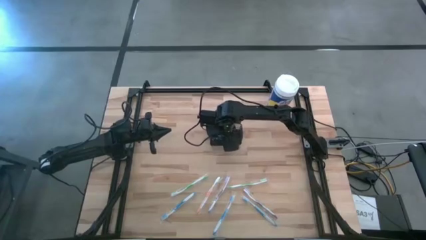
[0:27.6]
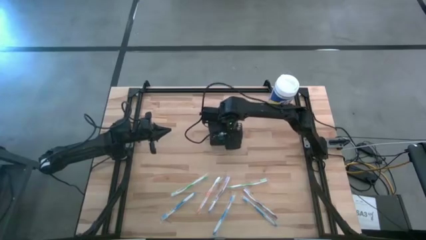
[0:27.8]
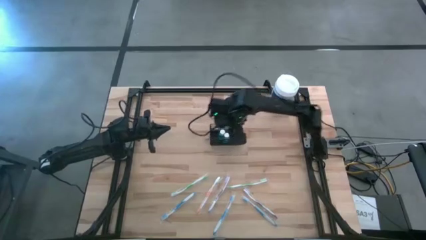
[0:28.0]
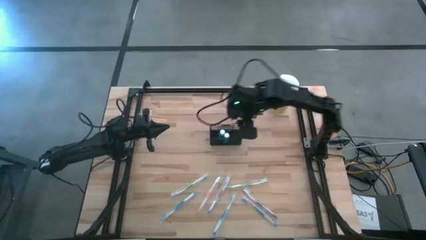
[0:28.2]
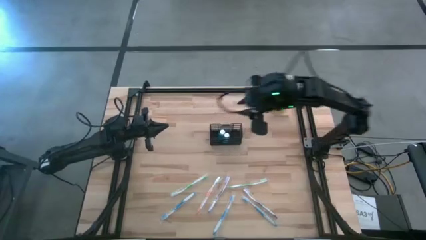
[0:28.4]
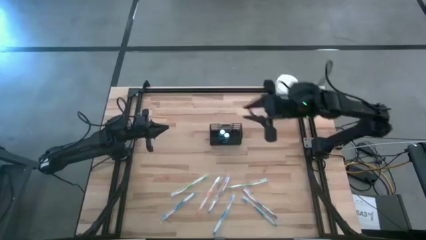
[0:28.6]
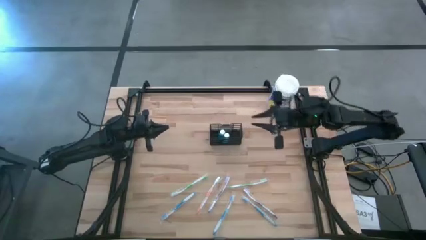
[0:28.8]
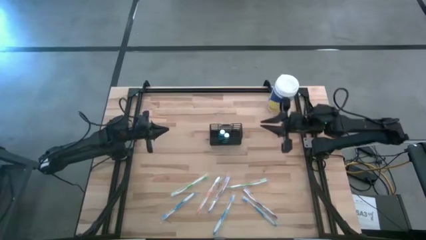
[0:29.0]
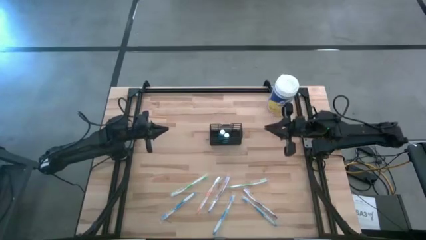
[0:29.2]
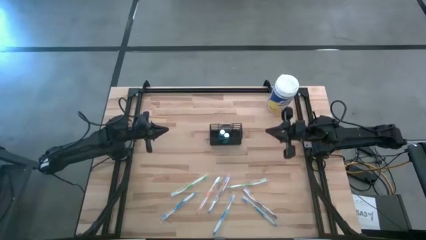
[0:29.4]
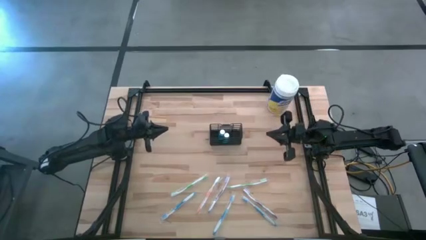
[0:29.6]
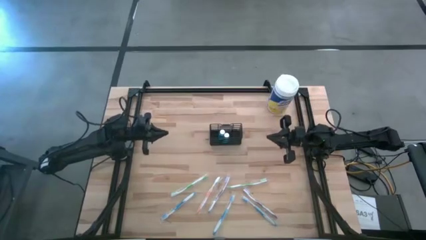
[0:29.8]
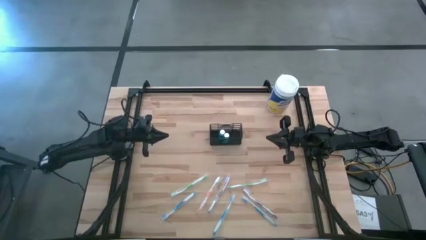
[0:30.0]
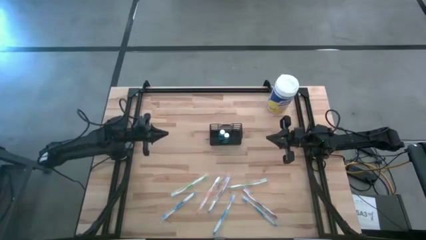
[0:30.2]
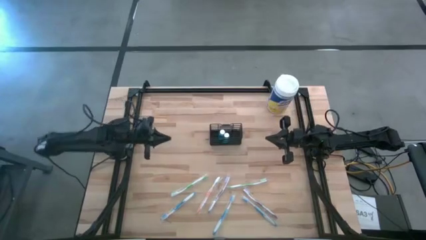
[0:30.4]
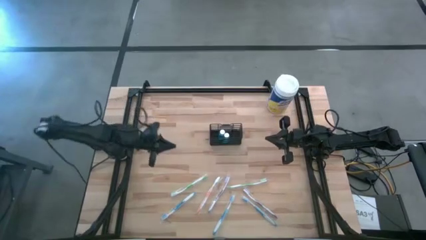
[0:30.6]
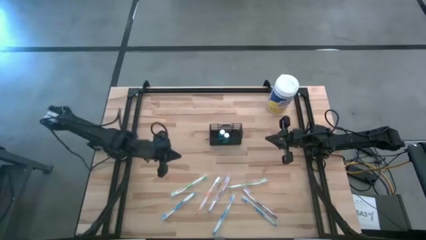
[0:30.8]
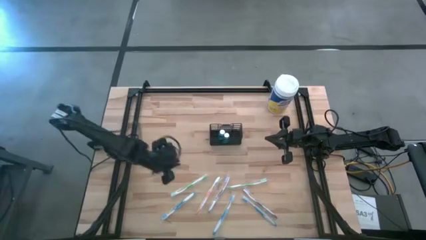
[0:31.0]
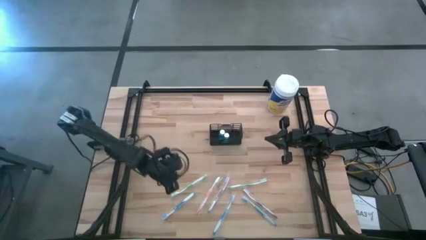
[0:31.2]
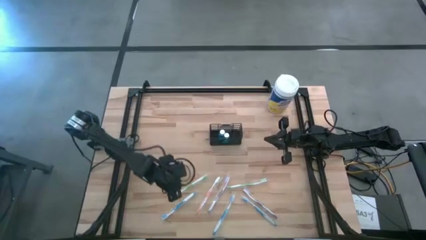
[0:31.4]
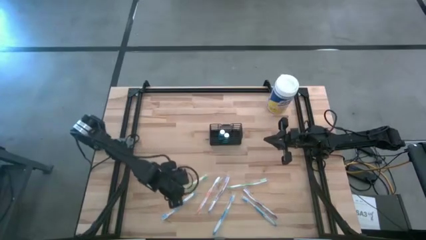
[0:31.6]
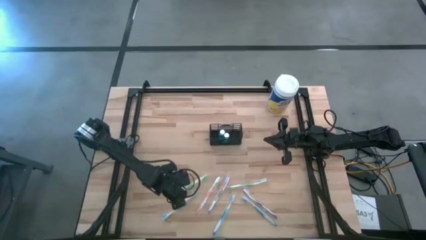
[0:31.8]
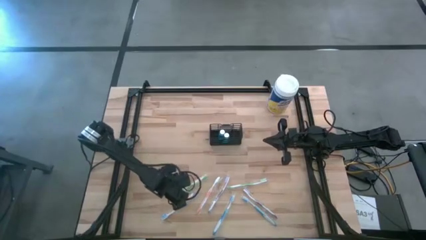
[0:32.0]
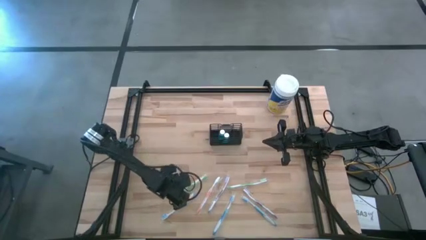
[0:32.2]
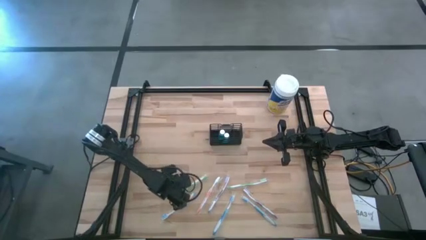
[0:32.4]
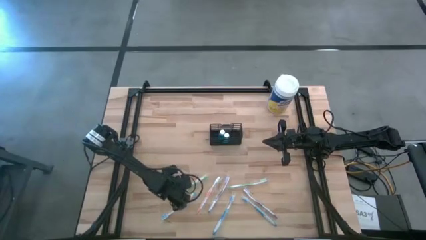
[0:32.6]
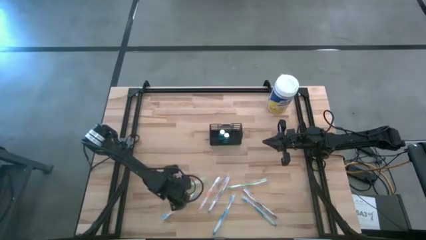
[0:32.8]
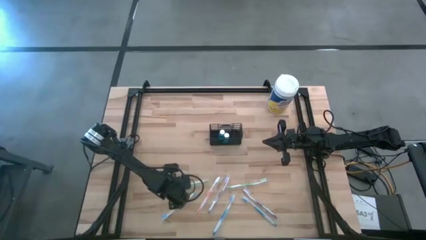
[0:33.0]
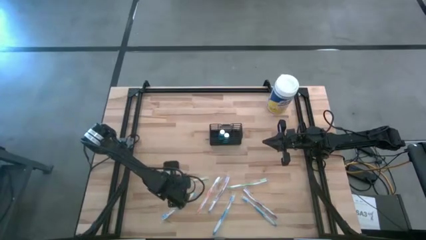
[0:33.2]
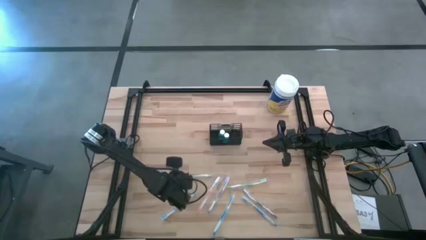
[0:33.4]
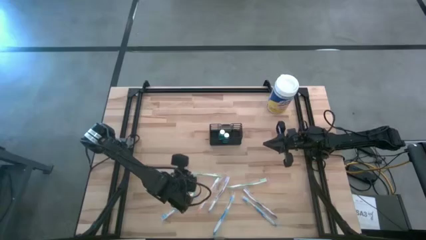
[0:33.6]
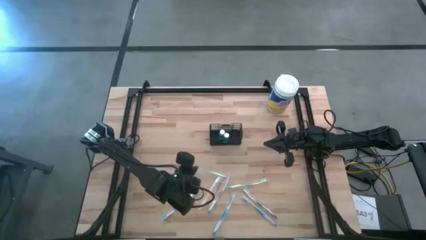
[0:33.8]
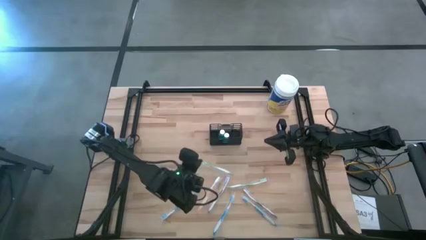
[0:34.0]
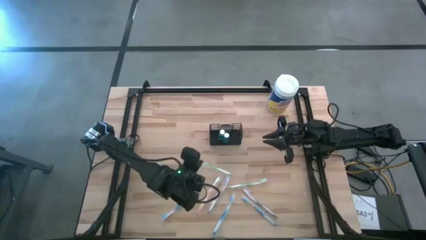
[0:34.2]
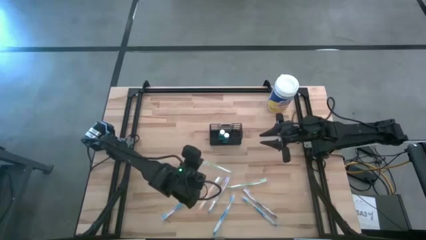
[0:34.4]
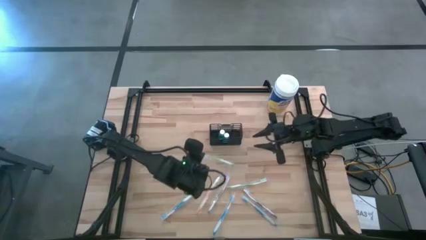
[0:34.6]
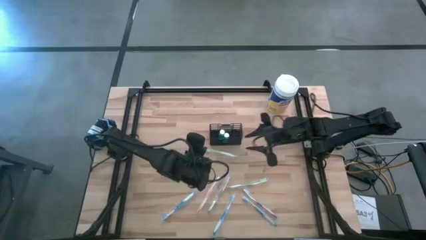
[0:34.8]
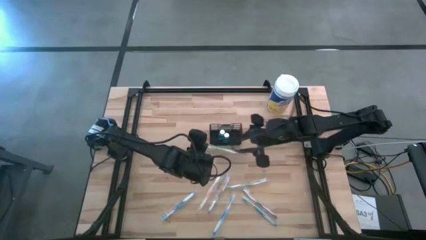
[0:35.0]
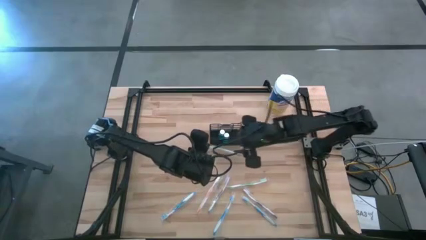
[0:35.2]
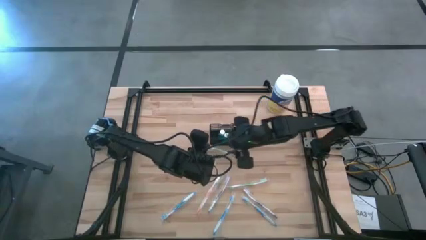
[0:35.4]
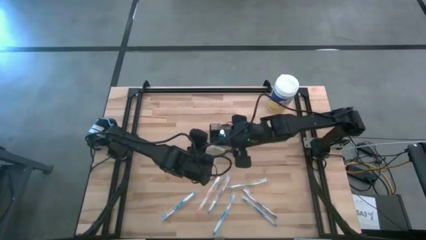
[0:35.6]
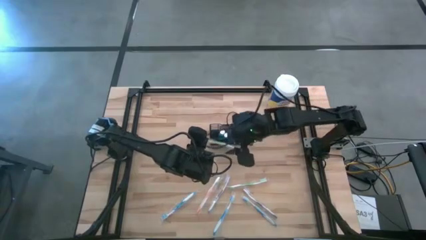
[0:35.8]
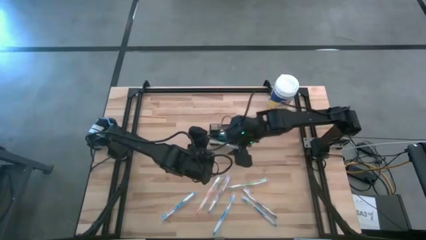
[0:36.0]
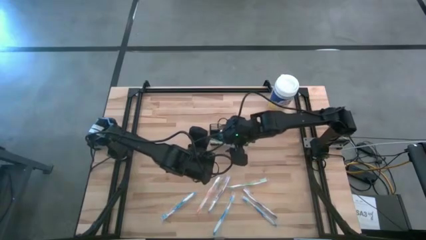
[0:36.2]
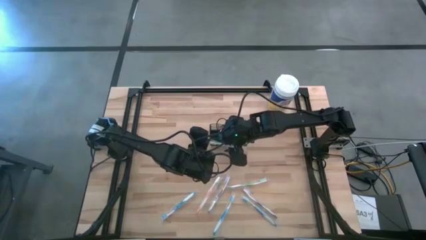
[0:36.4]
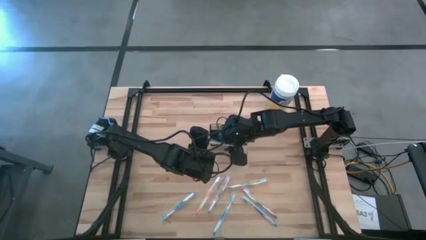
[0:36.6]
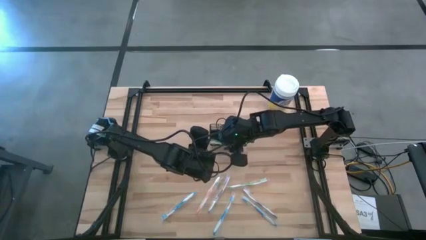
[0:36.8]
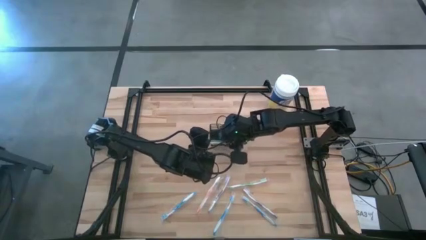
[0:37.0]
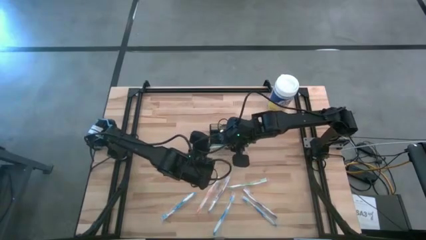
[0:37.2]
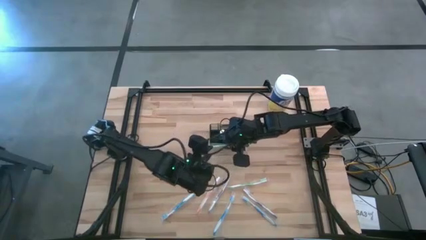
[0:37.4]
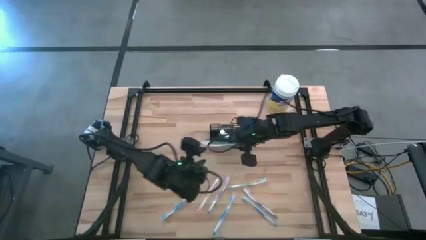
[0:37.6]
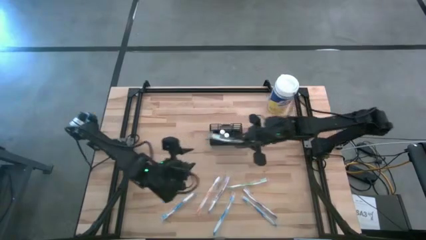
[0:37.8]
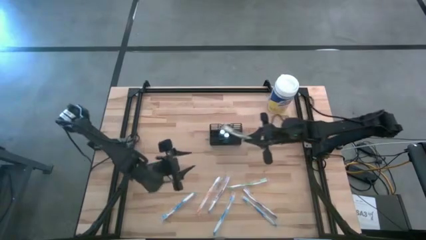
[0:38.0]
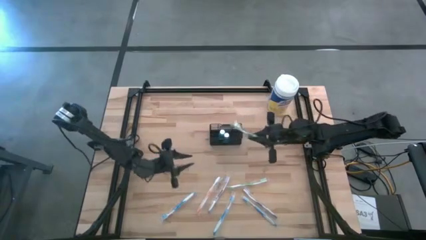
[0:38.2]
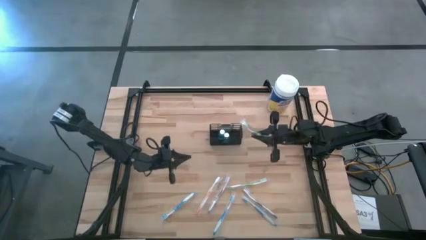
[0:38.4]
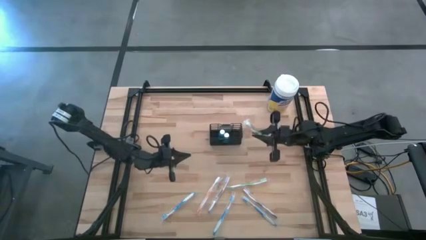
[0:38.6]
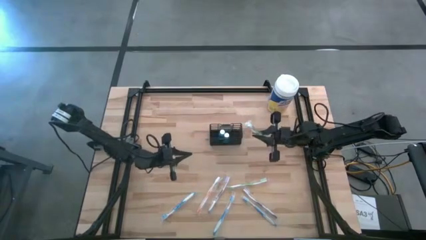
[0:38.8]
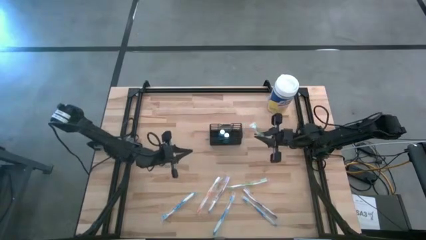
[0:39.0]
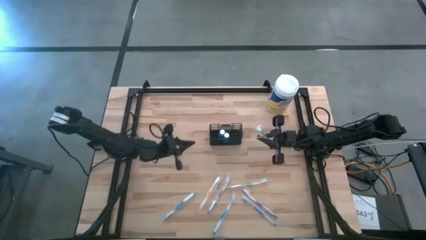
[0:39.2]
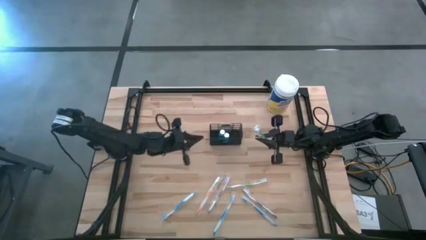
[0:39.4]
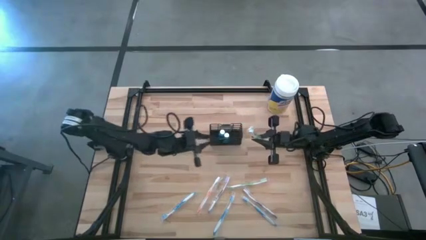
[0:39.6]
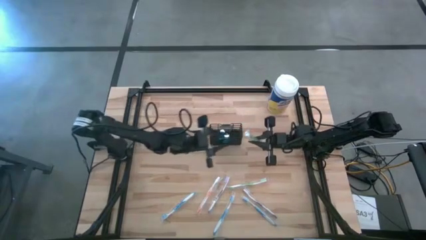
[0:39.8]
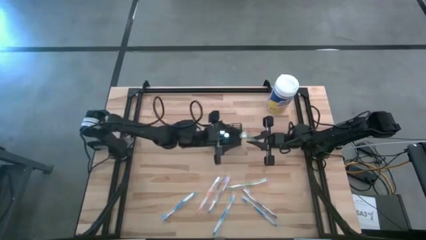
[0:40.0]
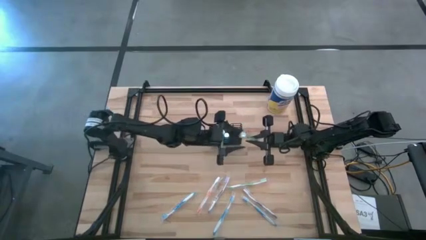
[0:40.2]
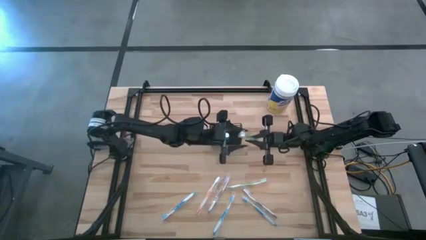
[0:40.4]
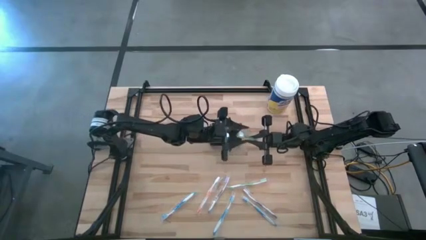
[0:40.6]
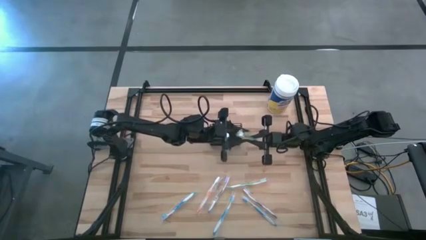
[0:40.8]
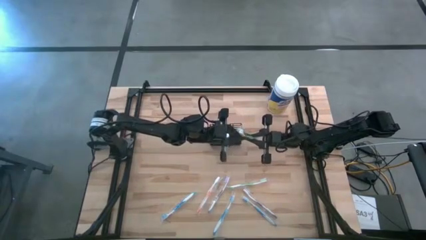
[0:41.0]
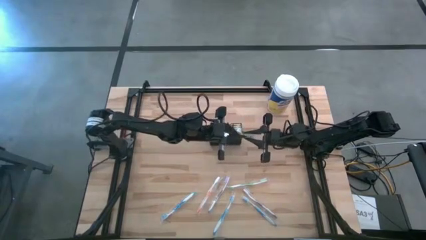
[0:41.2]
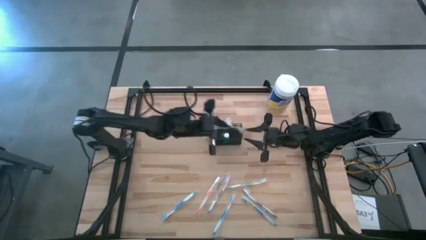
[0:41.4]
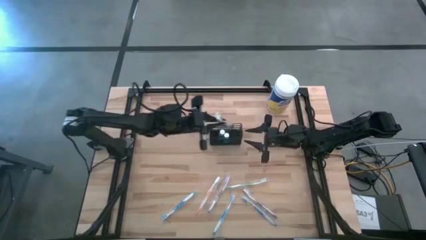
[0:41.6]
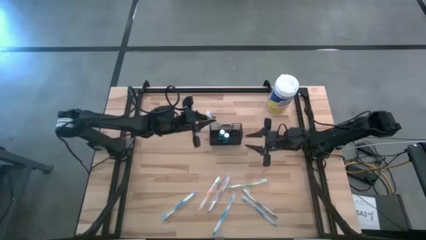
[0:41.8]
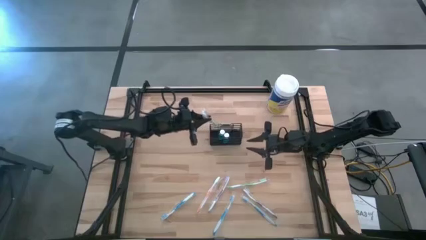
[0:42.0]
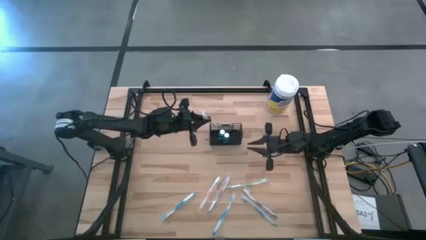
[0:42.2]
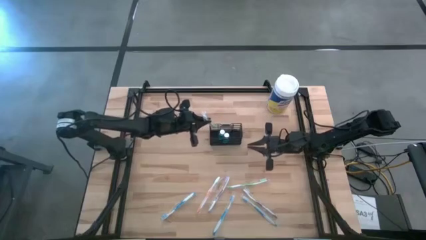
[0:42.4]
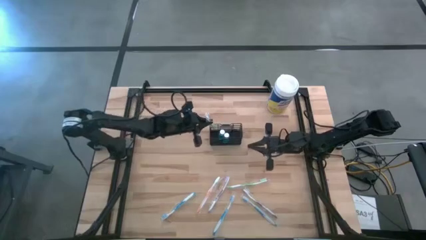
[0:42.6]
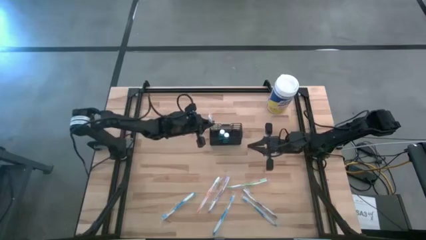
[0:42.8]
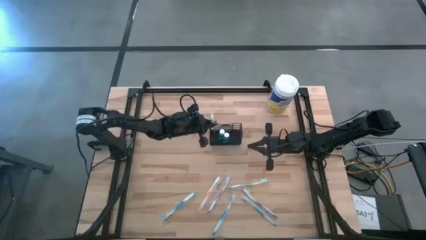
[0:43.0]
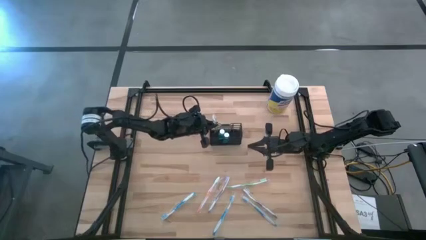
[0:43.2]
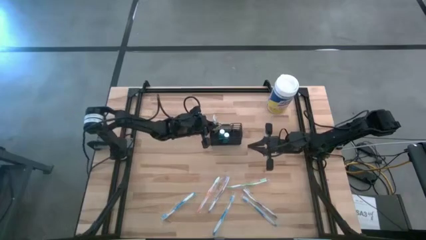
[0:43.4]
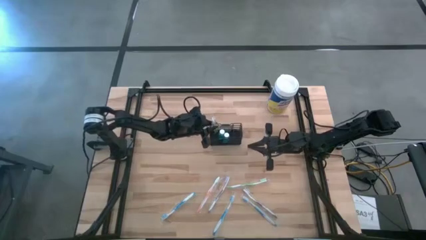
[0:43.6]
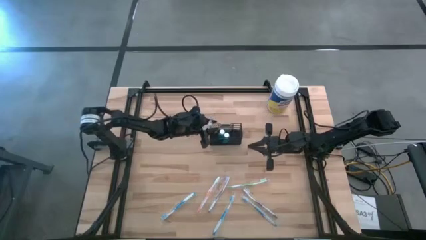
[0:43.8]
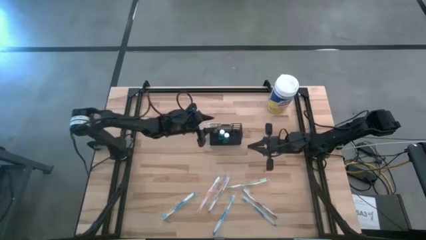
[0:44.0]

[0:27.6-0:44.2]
Task: Pick & Place toothbrushing station
Put the left green toothbrush into the black wire organizer
